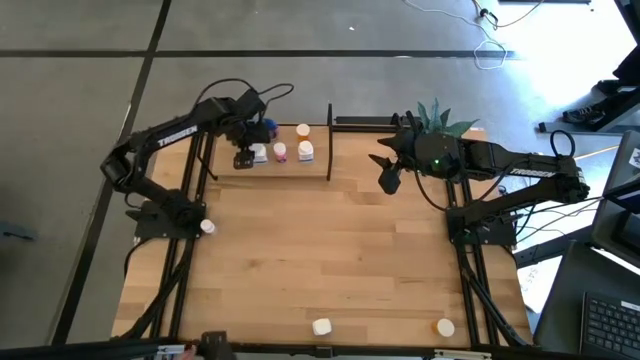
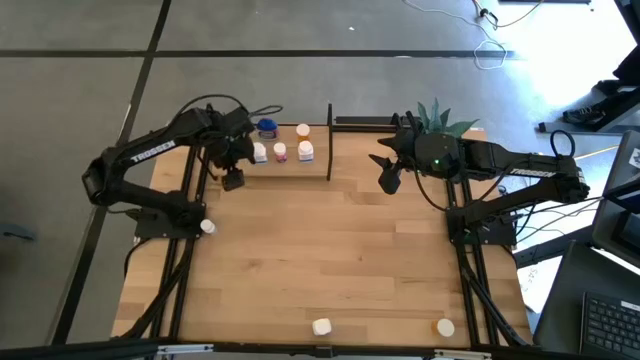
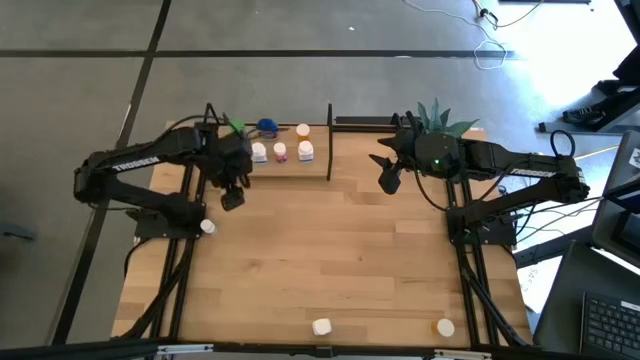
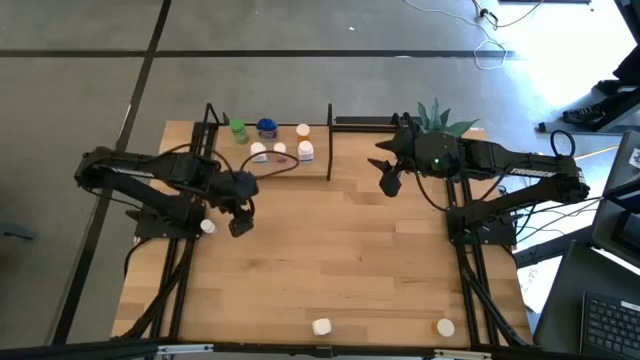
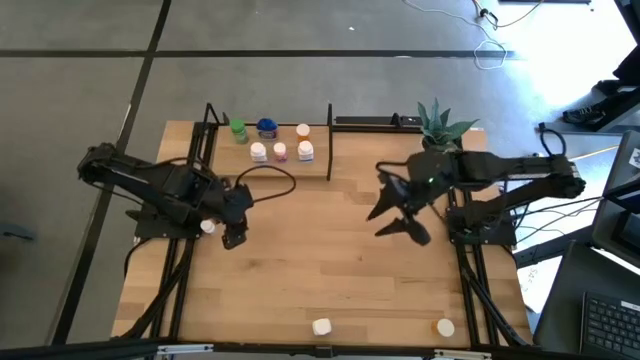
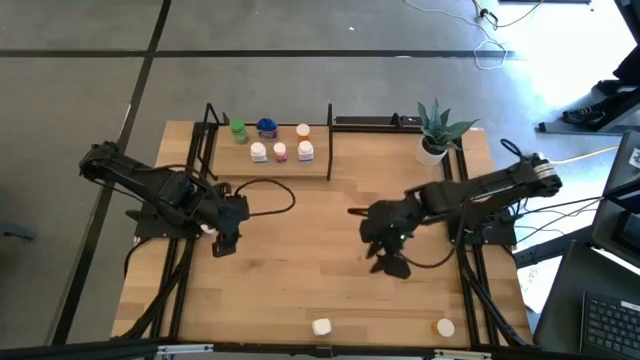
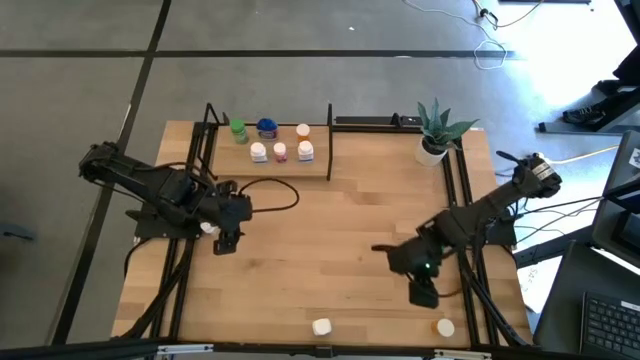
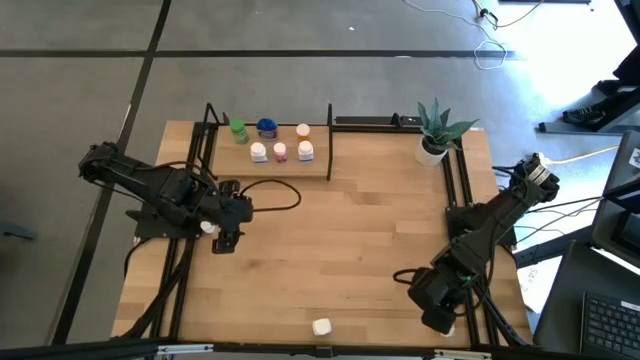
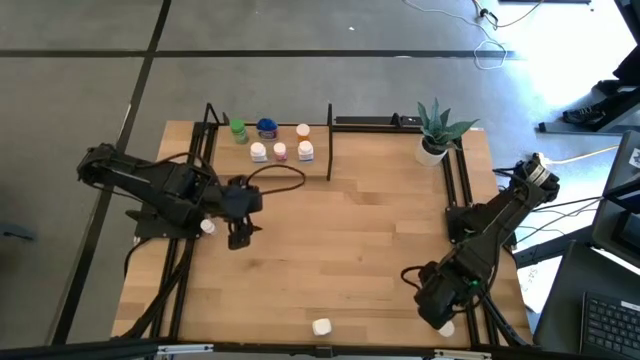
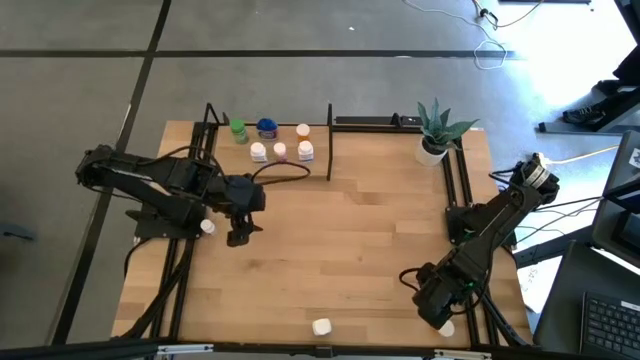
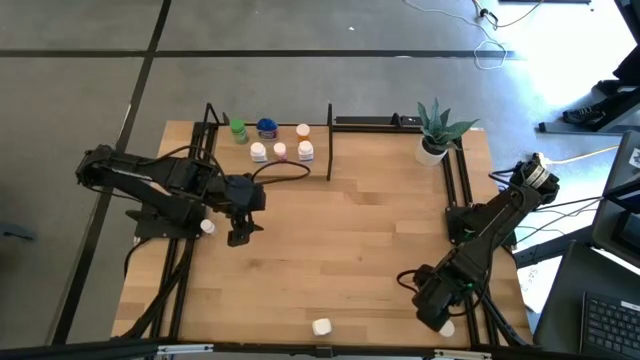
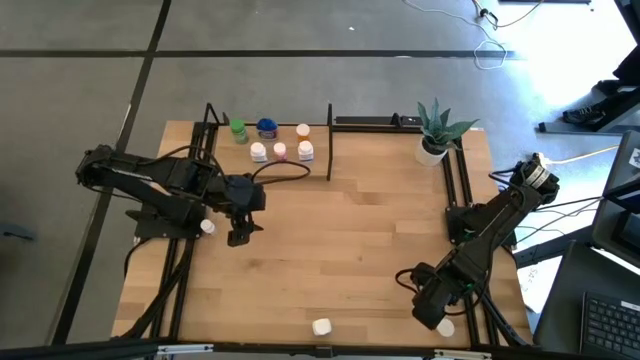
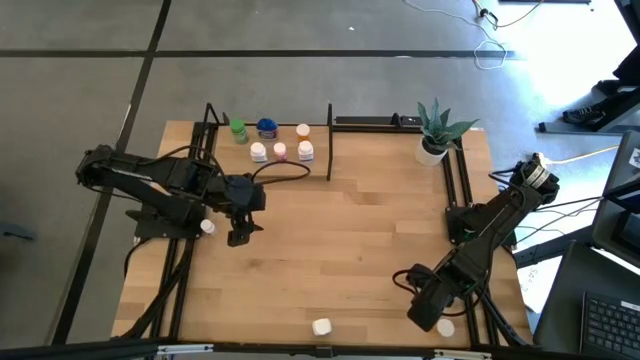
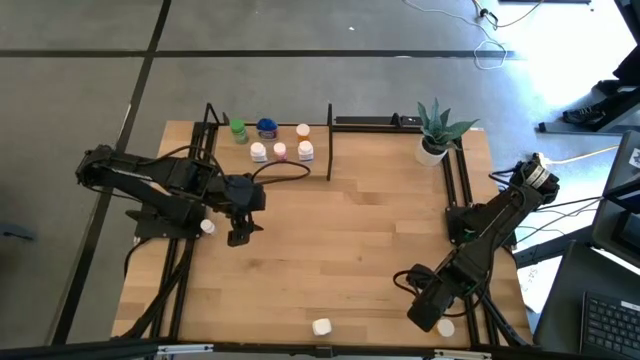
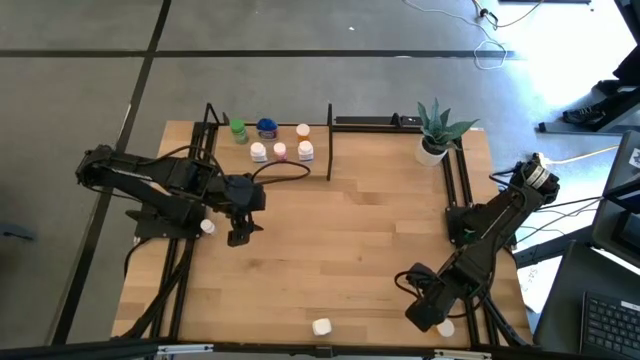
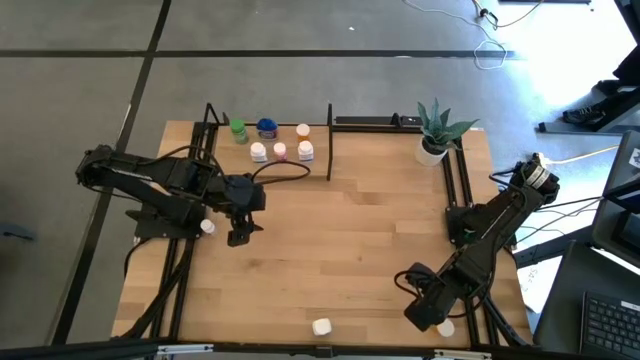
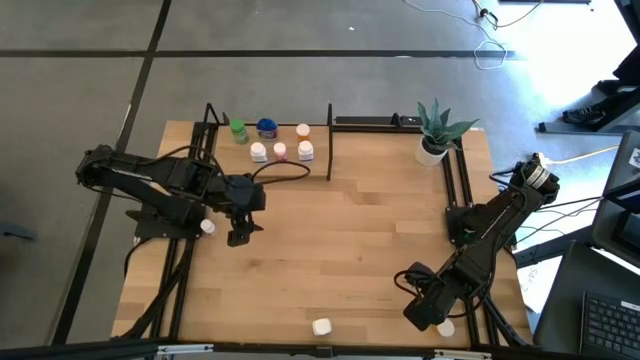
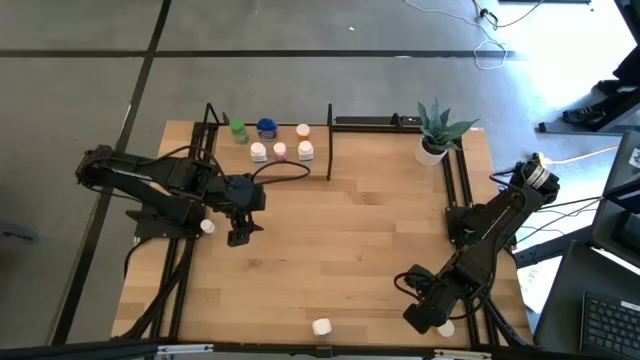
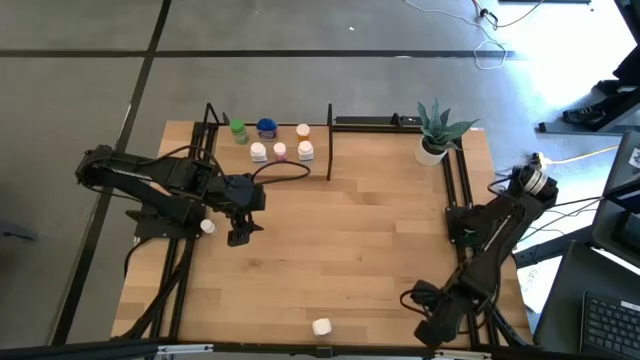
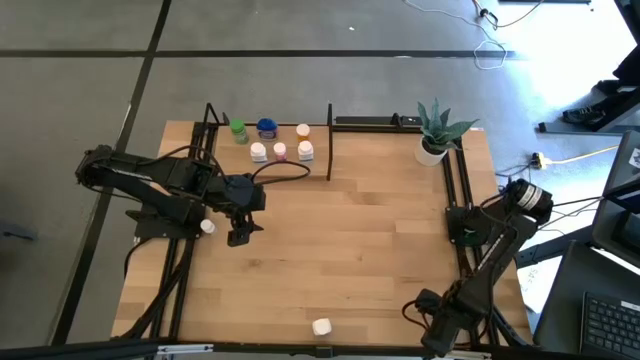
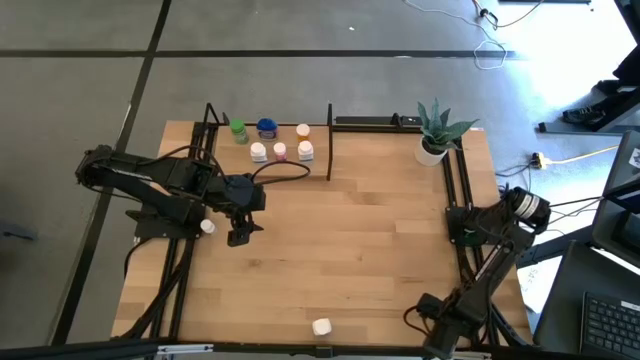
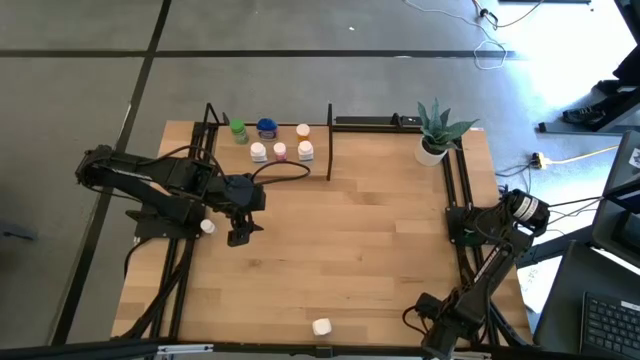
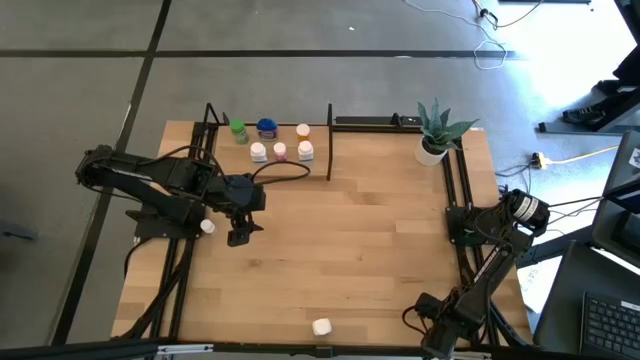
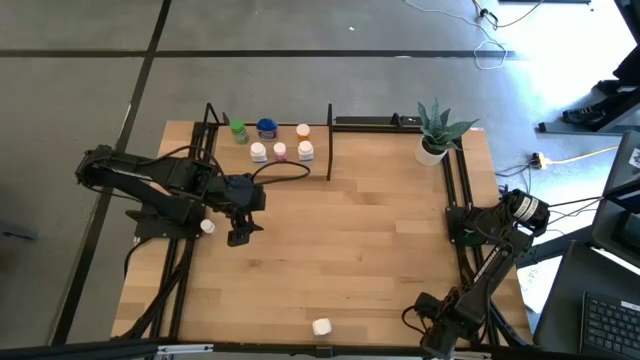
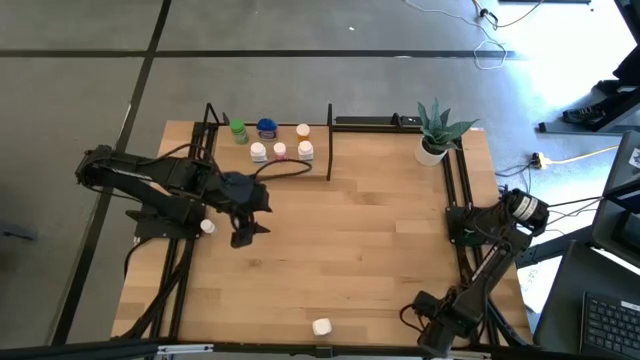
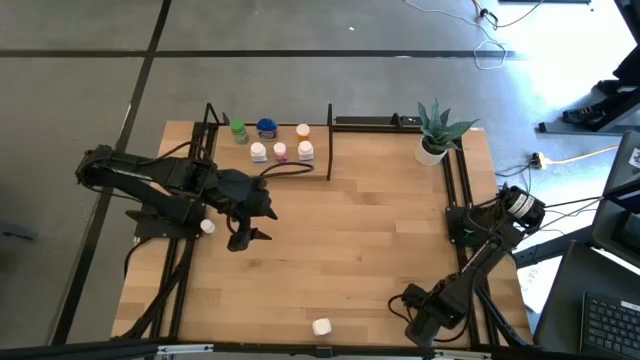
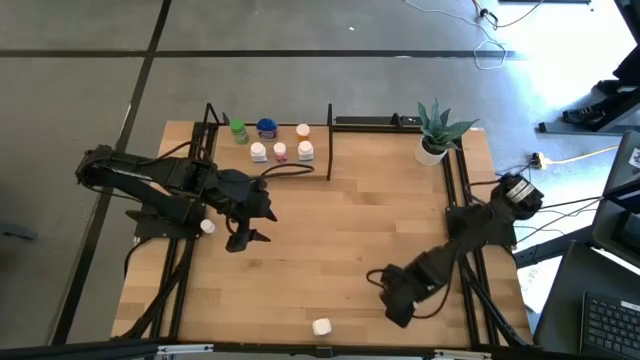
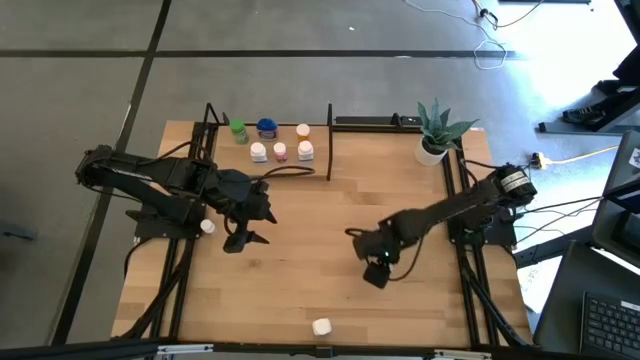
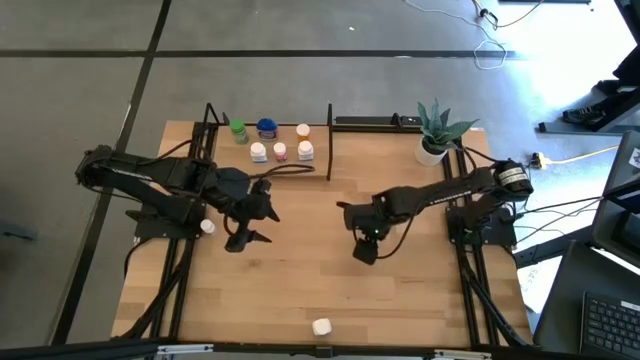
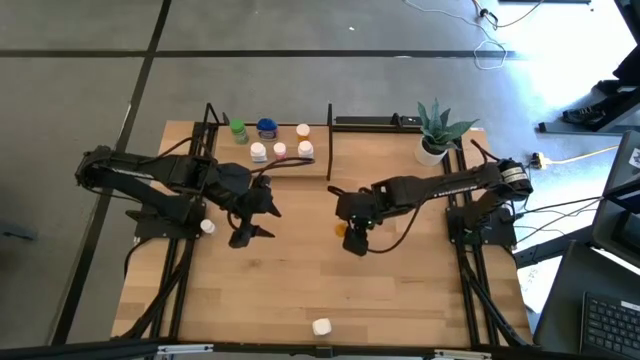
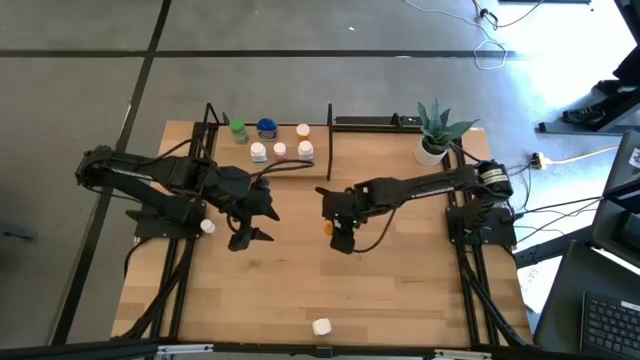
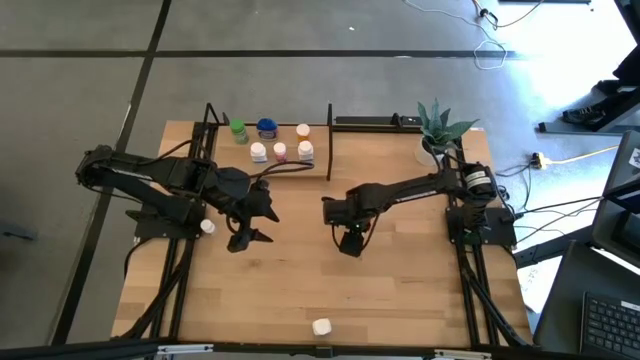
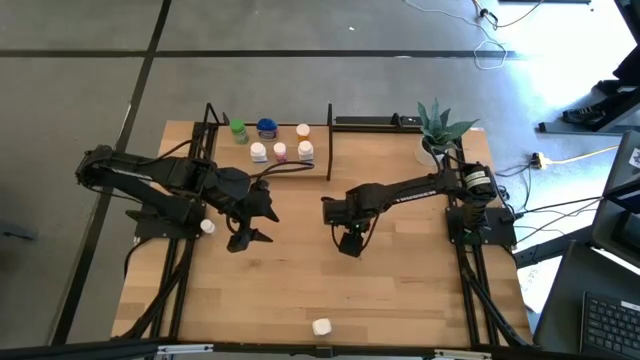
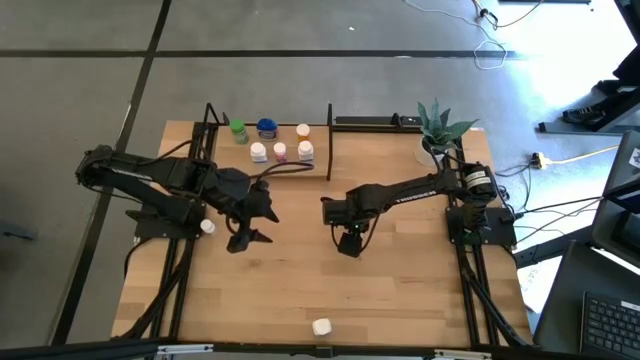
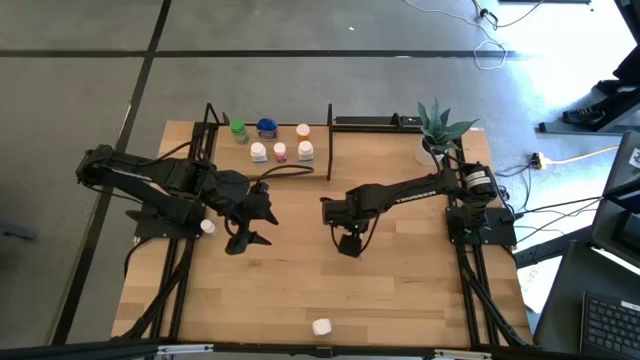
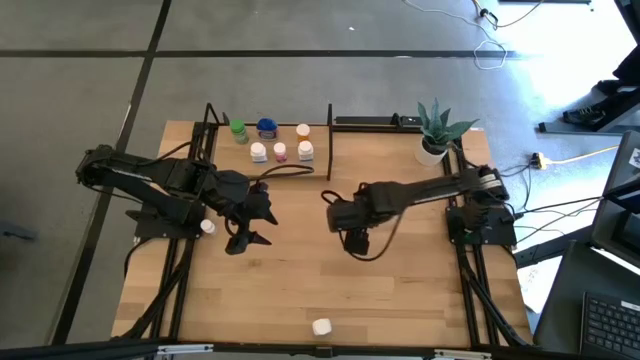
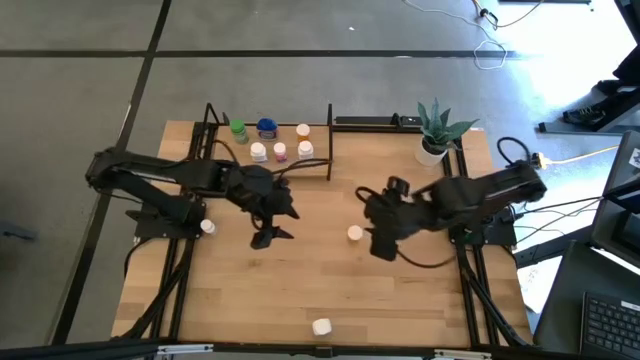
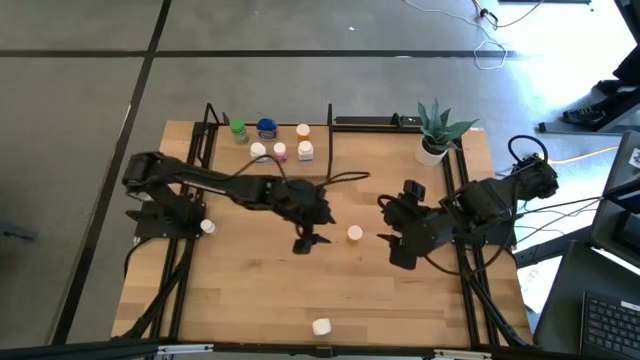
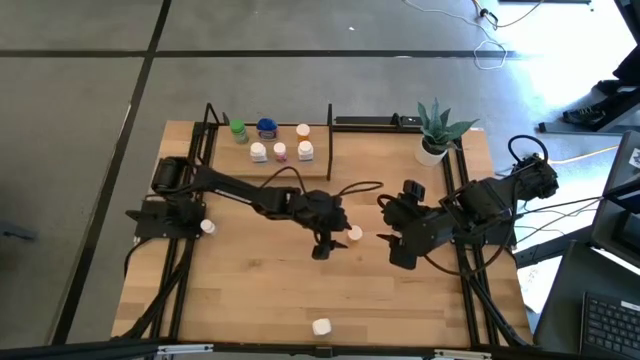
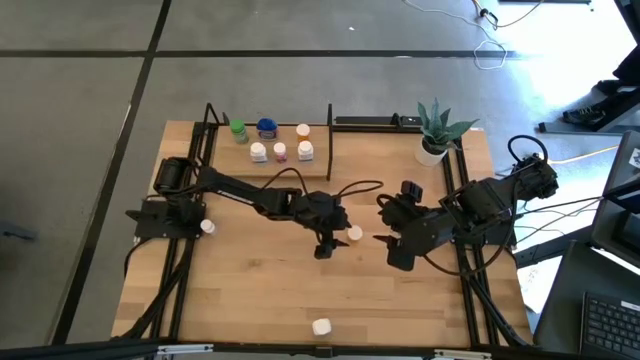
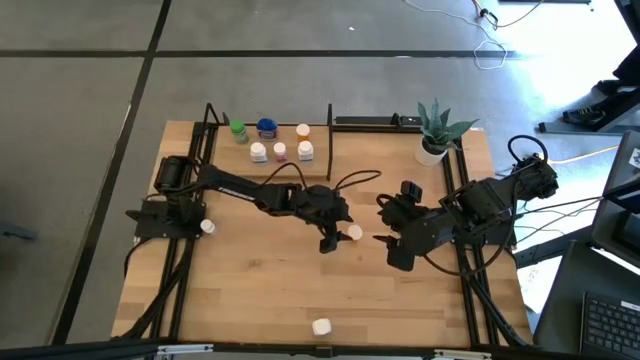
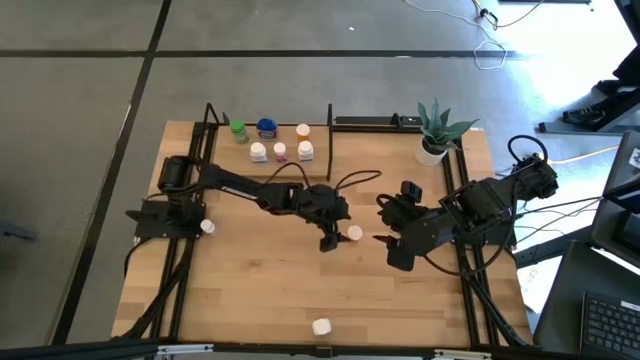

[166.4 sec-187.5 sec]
Task: Pick and place medicine bottles onto shelf by color
Put the orange pill bottle on the shelf
